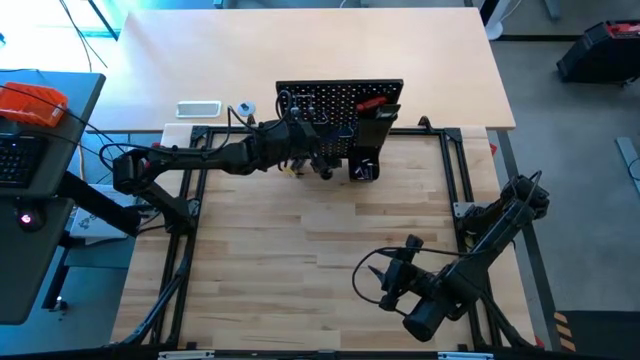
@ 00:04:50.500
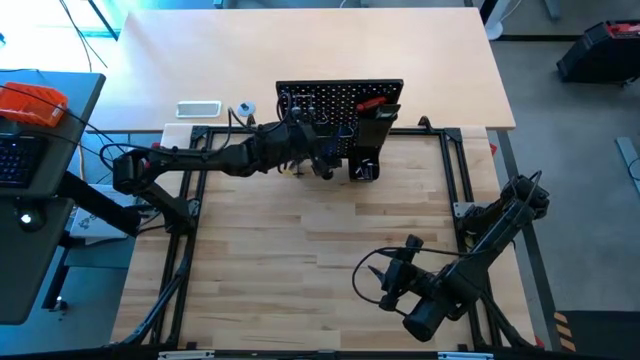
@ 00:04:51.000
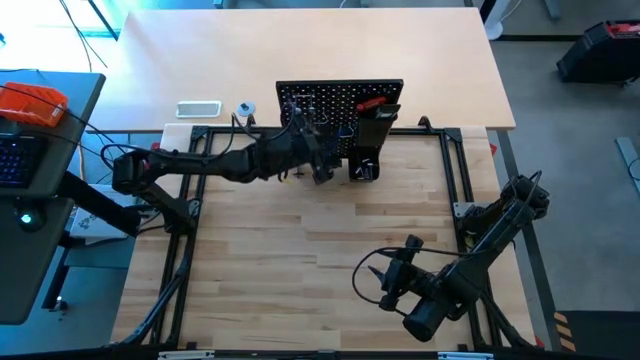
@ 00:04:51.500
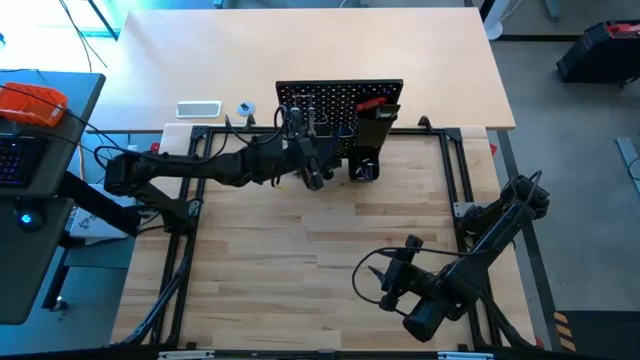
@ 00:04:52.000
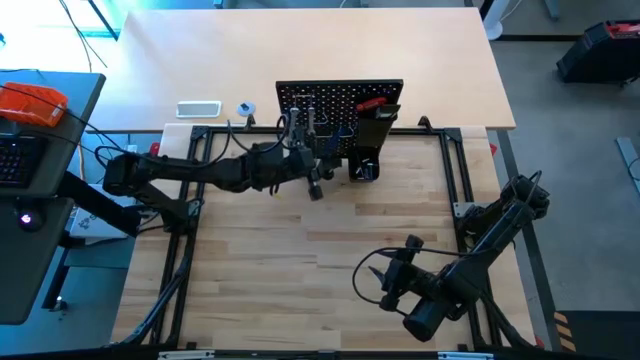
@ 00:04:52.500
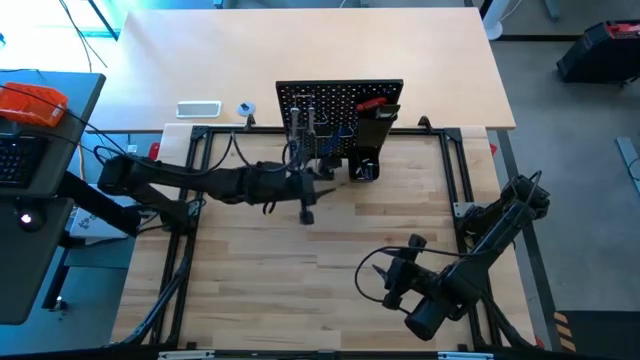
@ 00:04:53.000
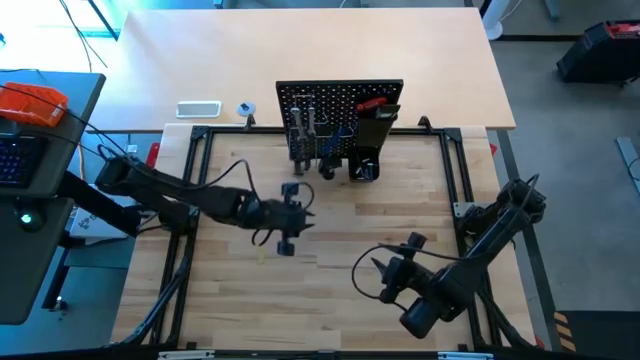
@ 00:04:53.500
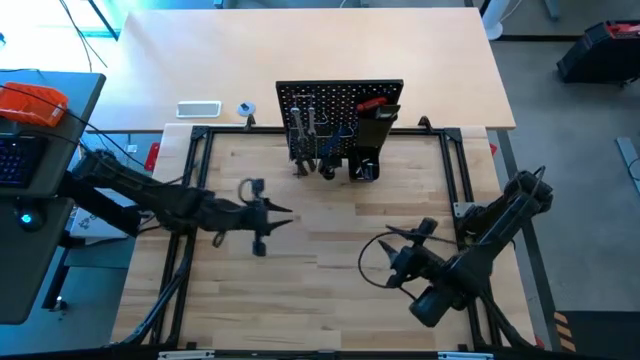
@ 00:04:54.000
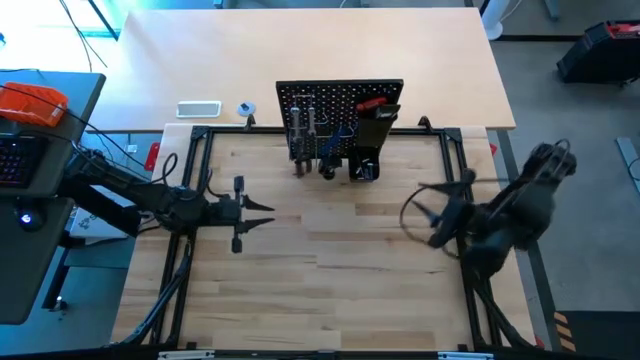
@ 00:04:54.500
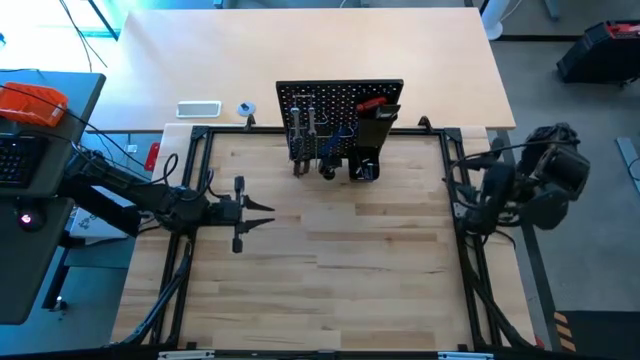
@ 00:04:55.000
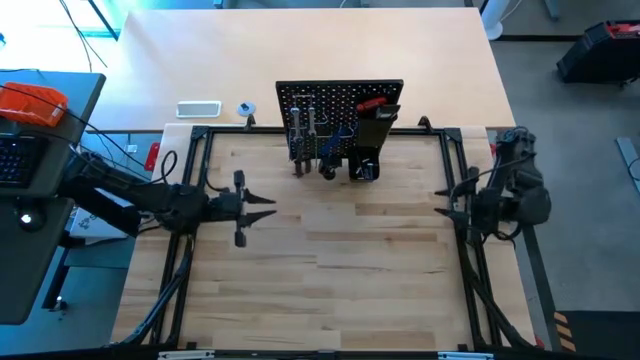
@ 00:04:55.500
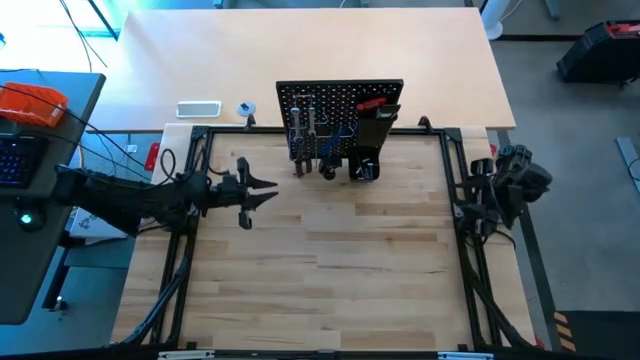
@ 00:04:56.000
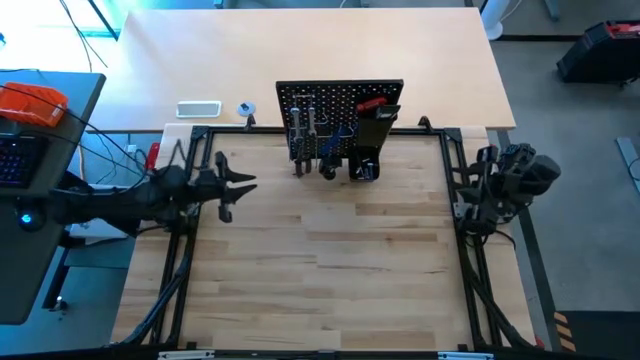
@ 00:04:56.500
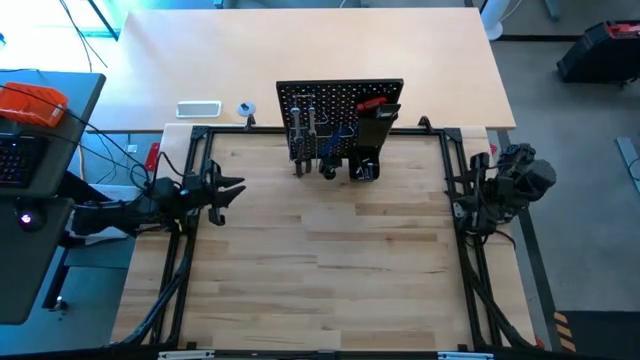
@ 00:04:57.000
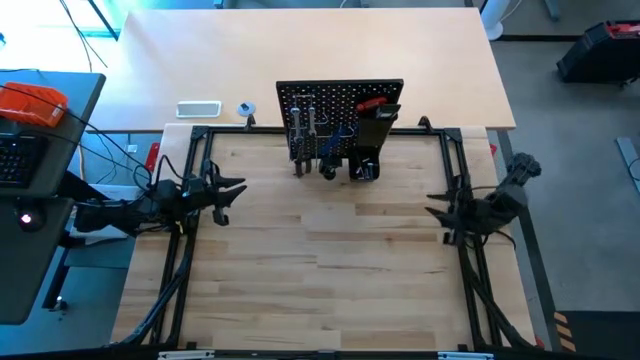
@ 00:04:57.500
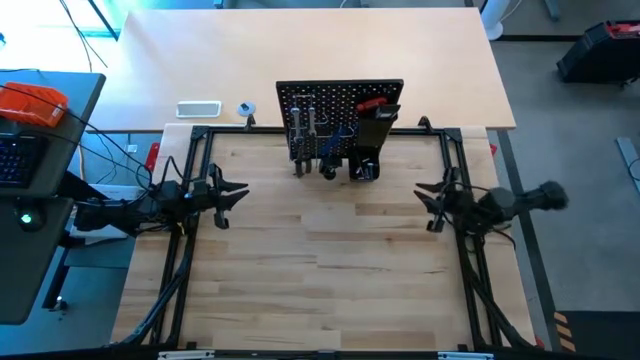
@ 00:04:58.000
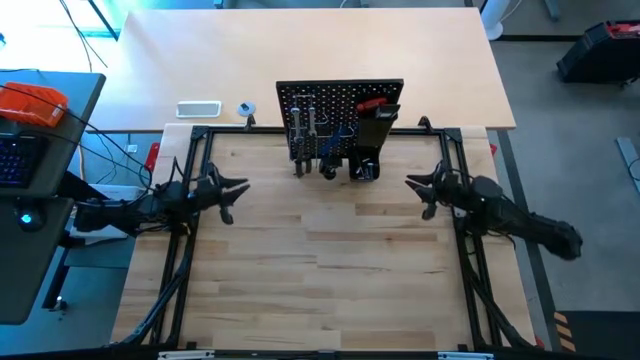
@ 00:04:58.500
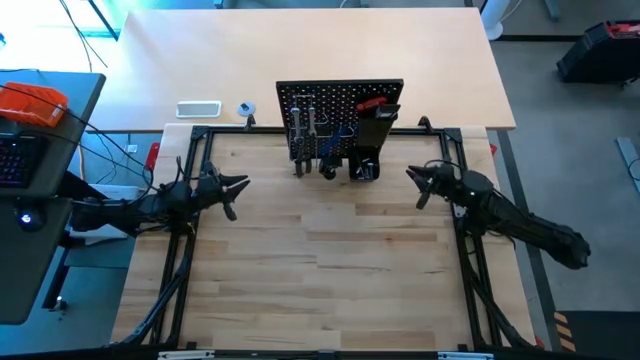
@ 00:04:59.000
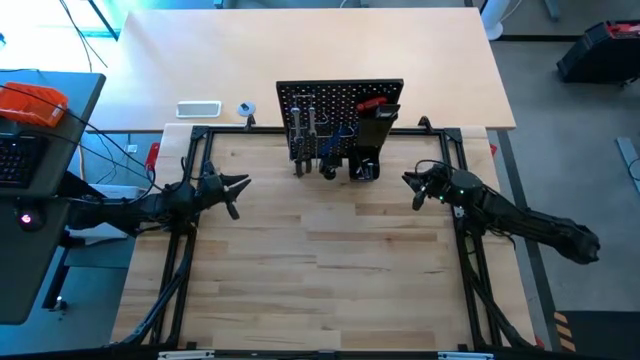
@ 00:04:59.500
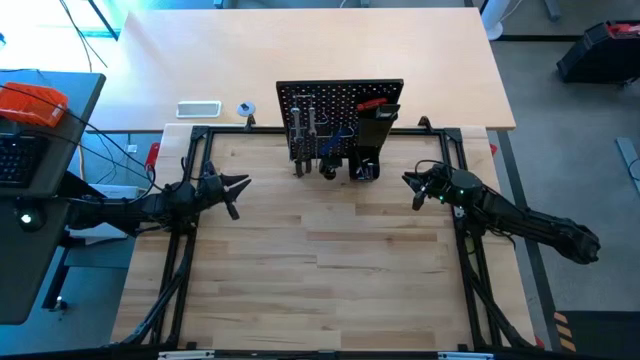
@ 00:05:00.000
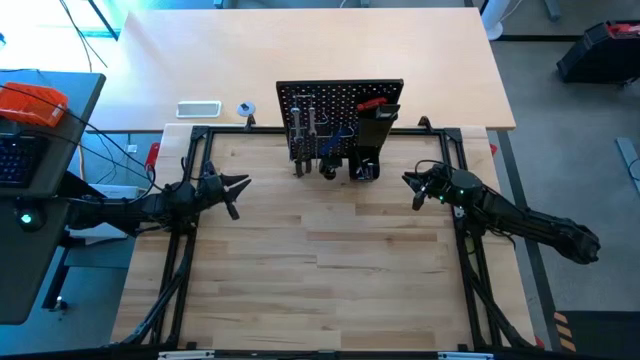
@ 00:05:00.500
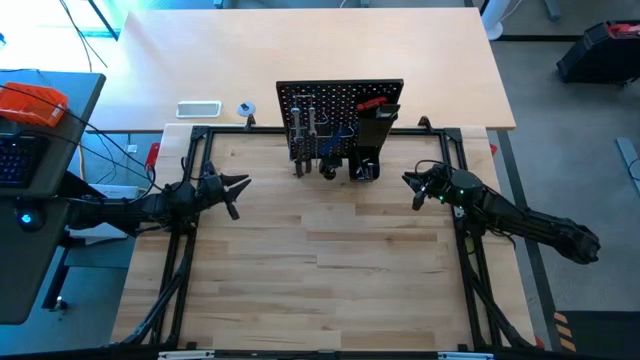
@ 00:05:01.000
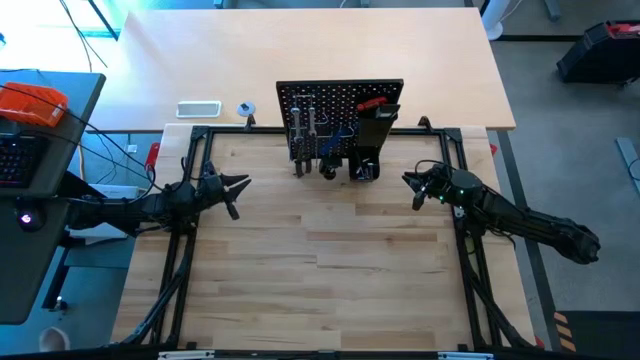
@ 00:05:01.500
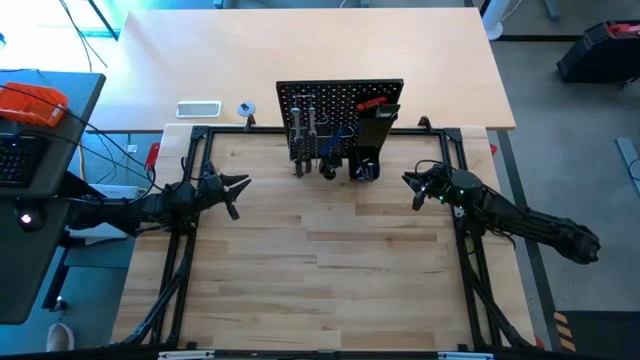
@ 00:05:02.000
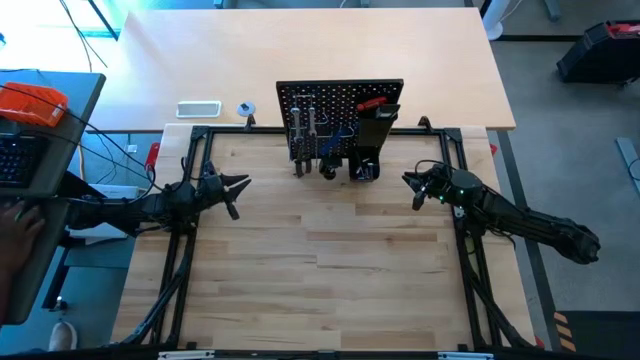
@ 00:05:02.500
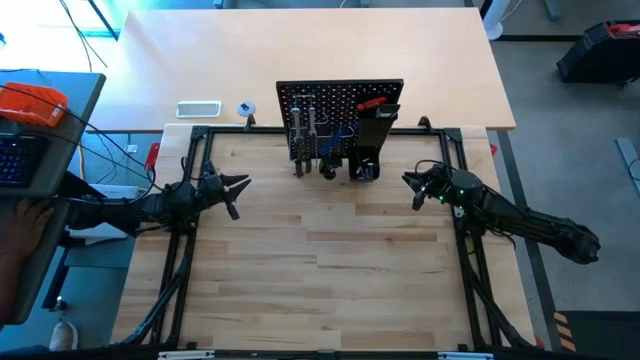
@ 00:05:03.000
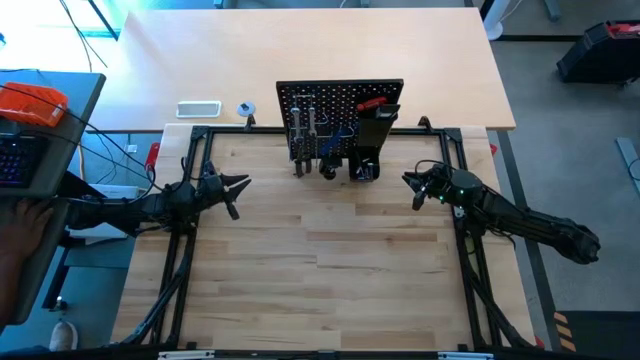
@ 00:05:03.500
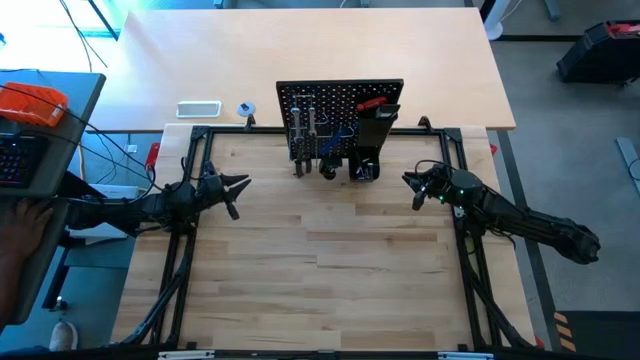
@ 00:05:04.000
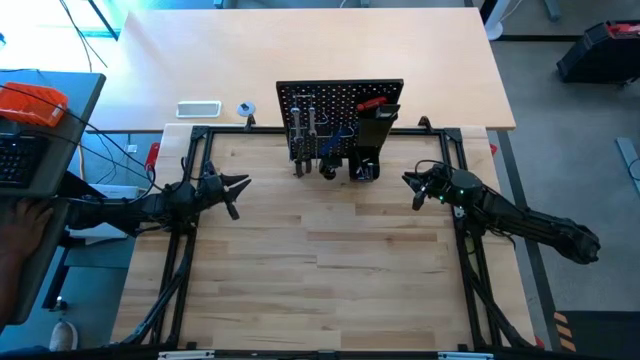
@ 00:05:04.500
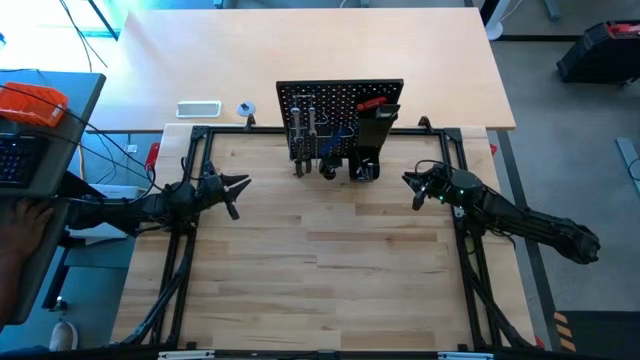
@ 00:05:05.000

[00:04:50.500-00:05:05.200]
Task: Hang tools onto peg board
Return to Home Position

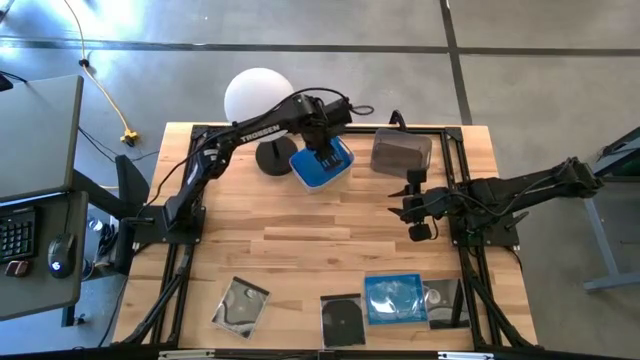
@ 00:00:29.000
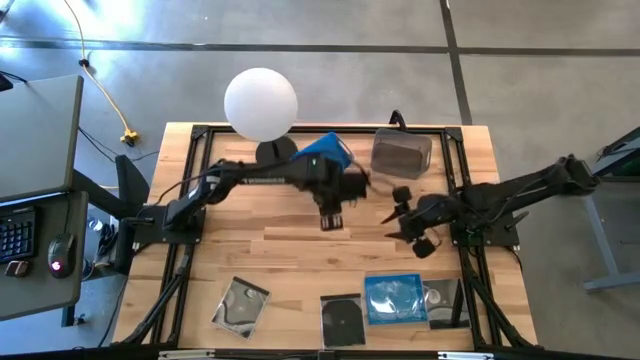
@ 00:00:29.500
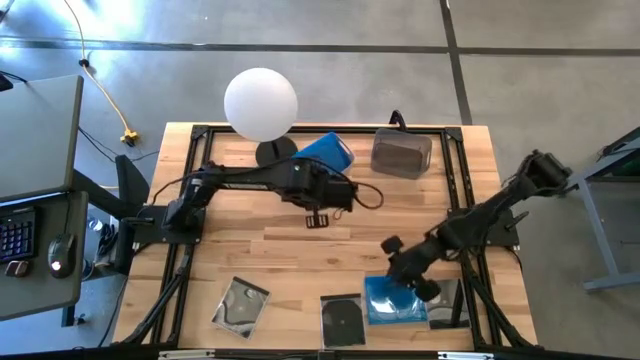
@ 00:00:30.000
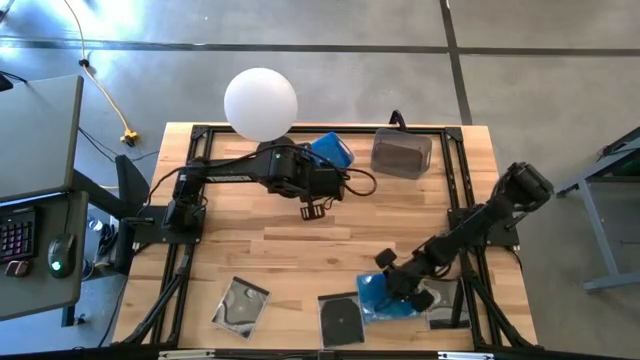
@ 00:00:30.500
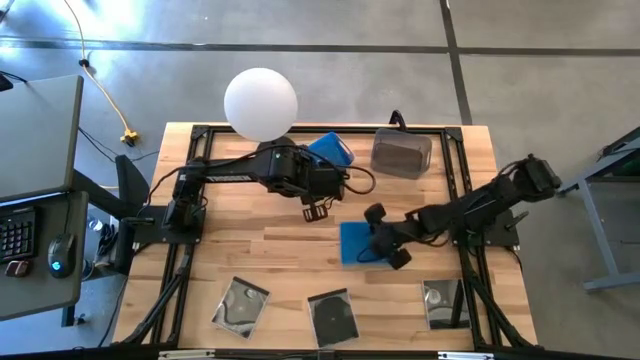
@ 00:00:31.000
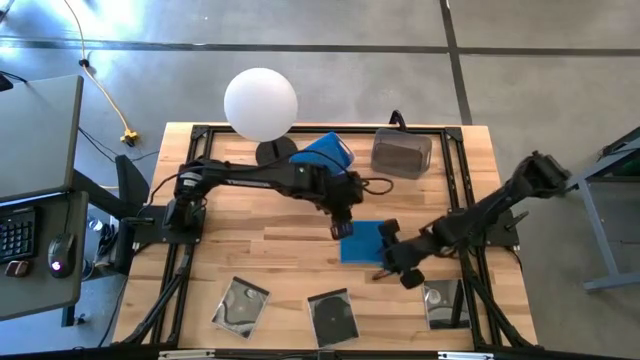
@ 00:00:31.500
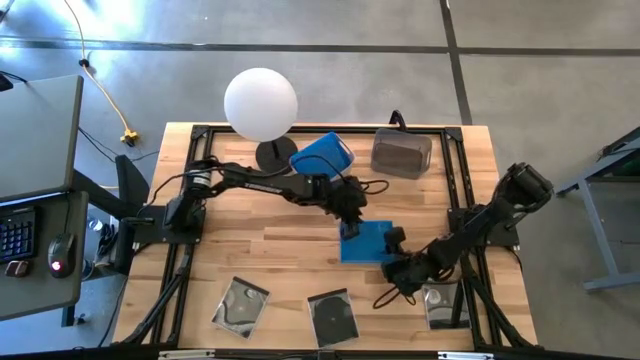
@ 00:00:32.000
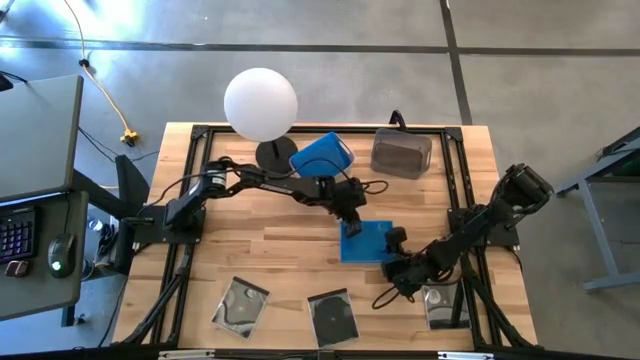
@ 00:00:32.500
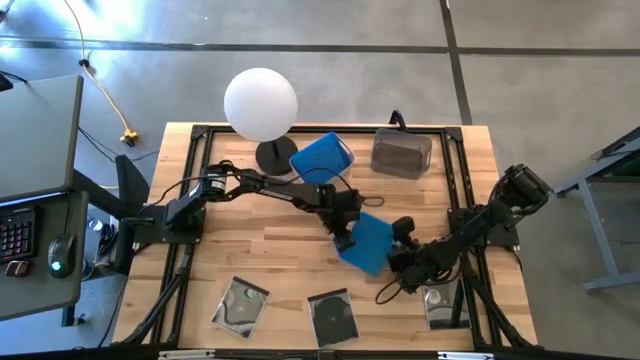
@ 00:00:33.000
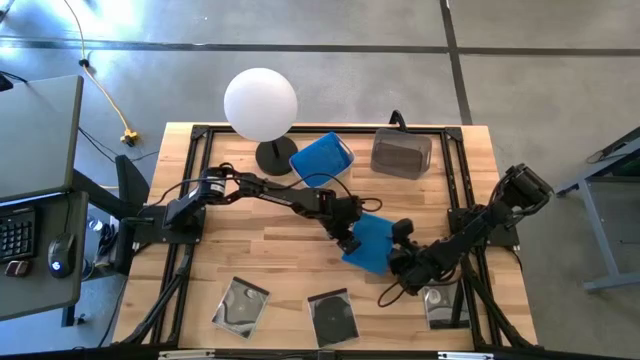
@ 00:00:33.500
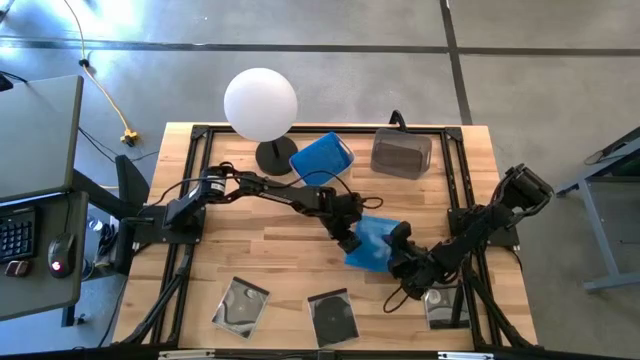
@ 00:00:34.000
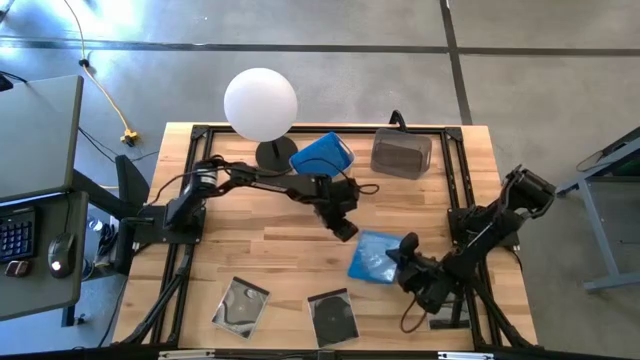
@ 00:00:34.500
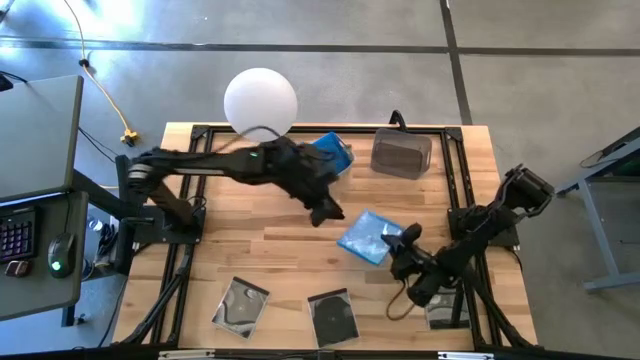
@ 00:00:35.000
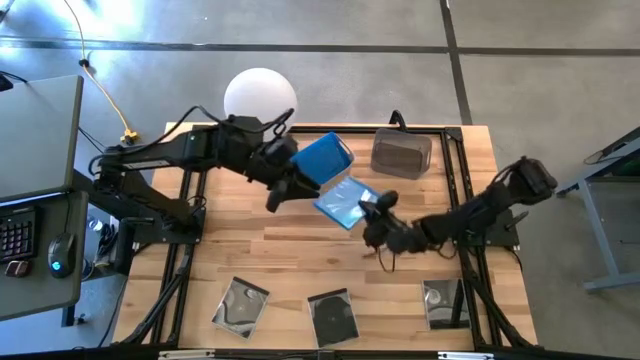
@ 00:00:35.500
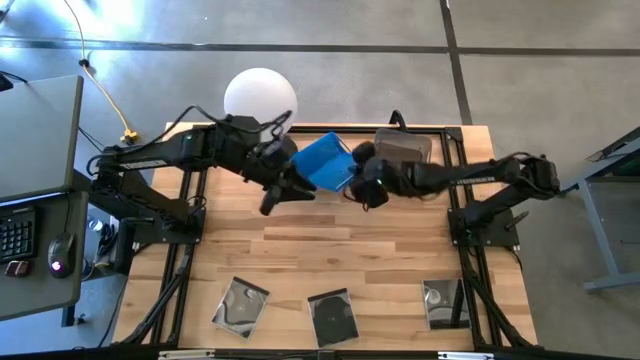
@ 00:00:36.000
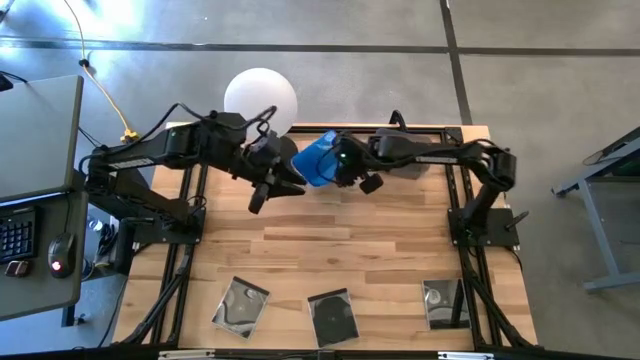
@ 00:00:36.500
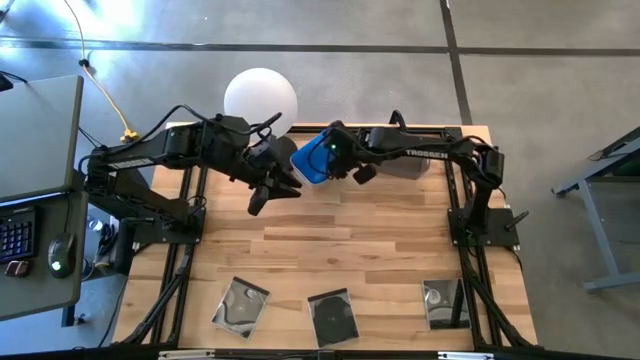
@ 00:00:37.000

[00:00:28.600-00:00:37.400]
Task: Pick & place jewel cases by type
Put the blue CD case into the gray bin
